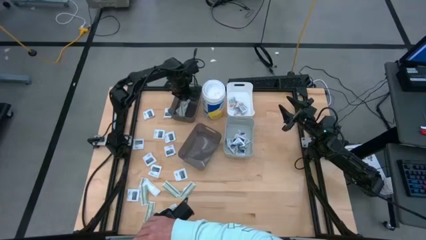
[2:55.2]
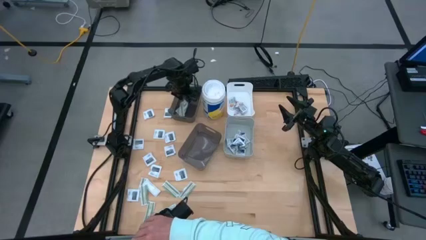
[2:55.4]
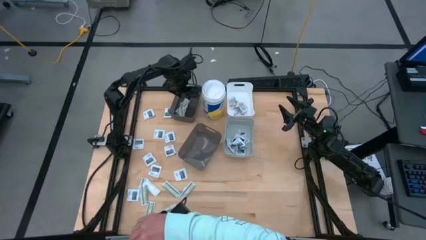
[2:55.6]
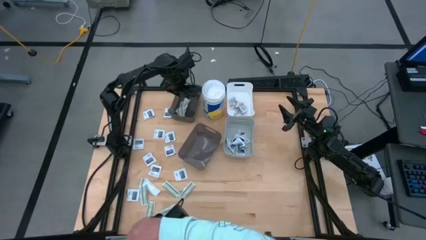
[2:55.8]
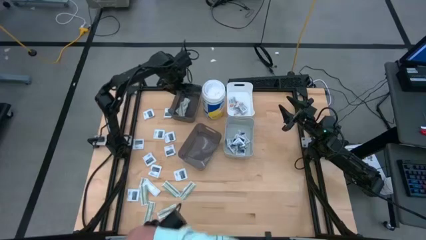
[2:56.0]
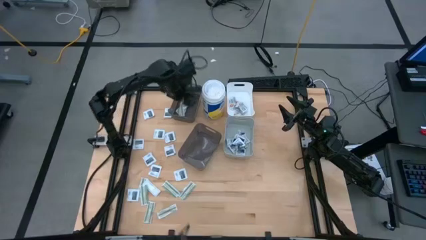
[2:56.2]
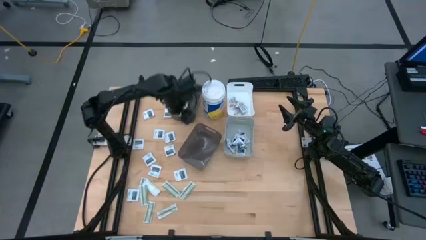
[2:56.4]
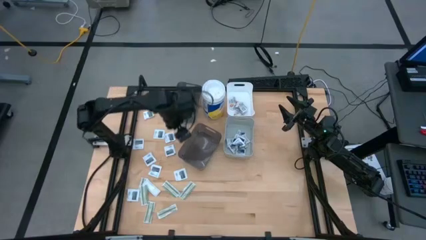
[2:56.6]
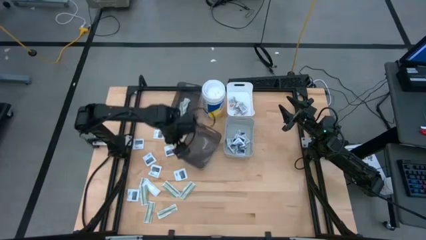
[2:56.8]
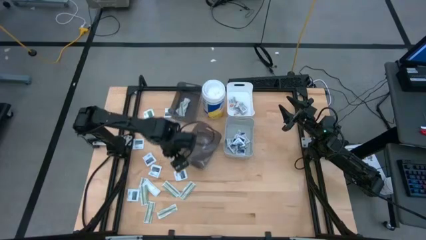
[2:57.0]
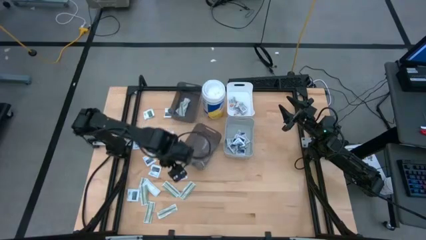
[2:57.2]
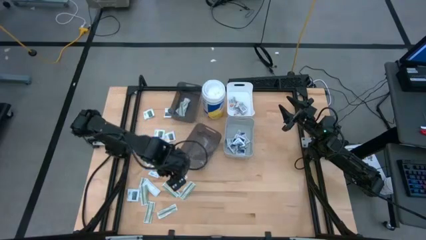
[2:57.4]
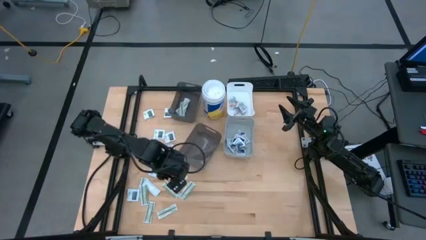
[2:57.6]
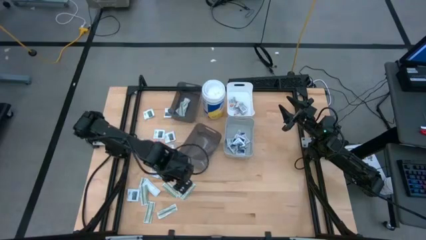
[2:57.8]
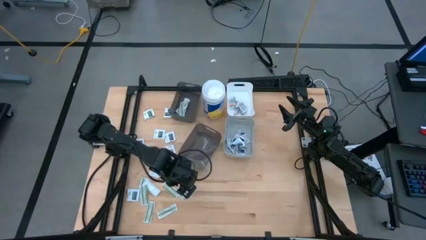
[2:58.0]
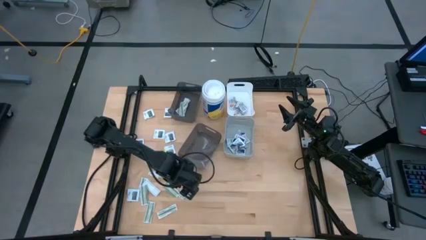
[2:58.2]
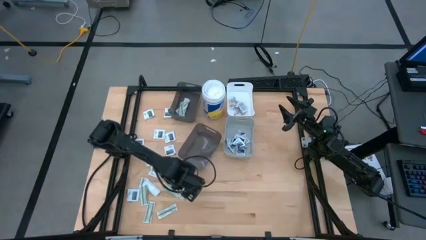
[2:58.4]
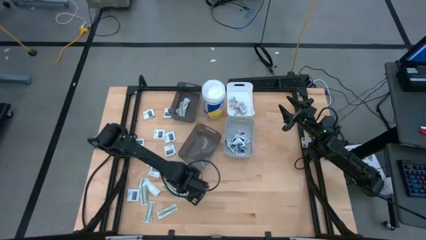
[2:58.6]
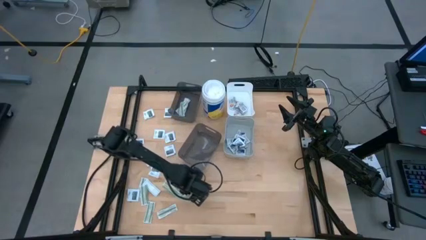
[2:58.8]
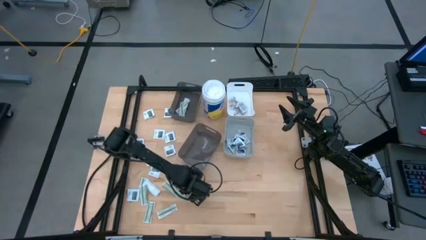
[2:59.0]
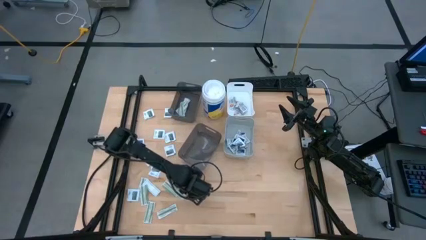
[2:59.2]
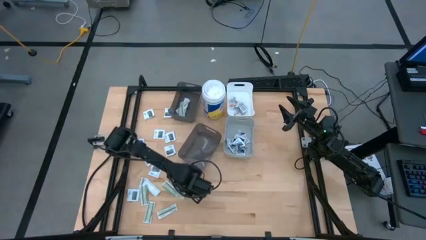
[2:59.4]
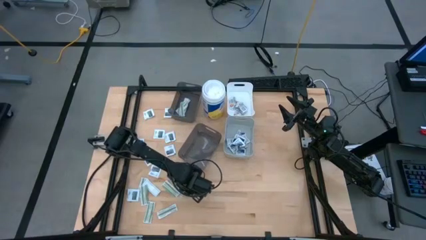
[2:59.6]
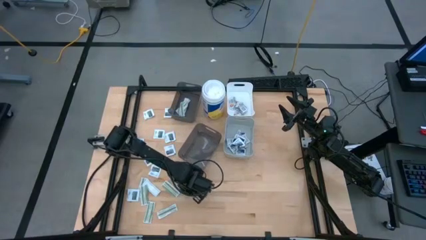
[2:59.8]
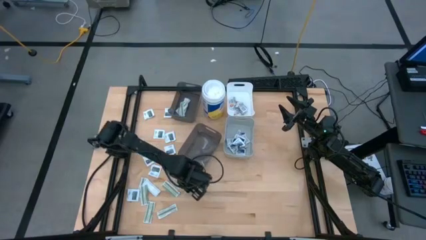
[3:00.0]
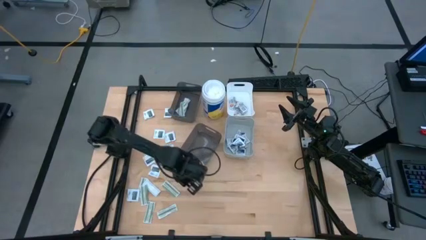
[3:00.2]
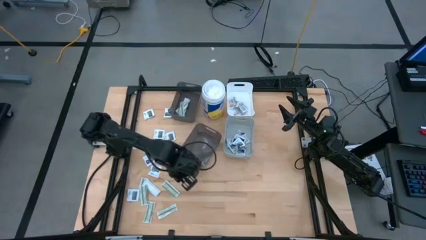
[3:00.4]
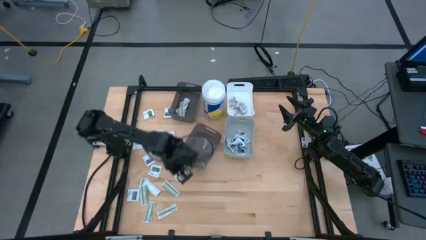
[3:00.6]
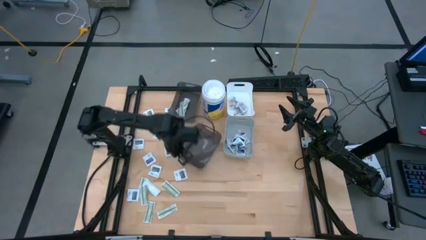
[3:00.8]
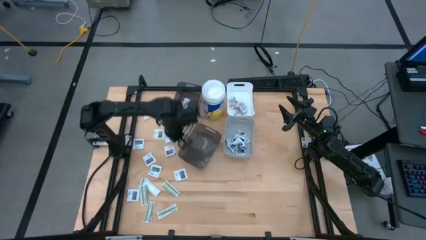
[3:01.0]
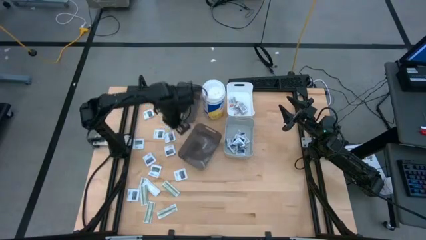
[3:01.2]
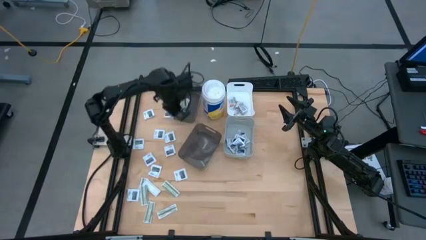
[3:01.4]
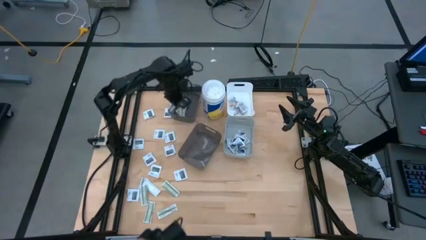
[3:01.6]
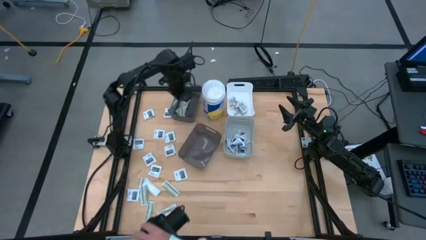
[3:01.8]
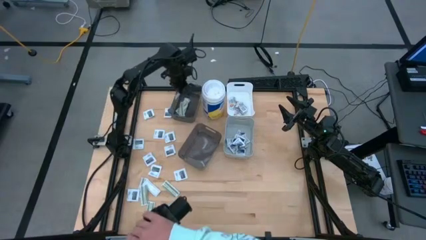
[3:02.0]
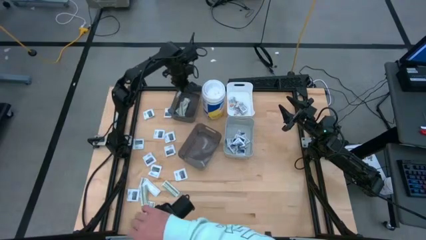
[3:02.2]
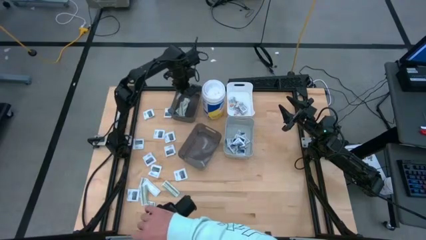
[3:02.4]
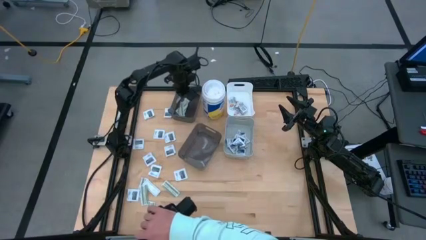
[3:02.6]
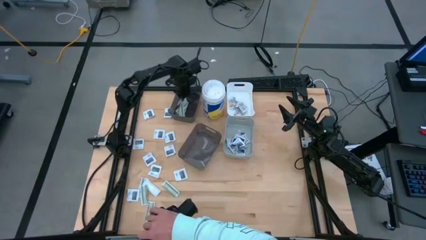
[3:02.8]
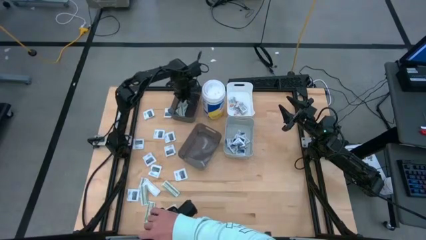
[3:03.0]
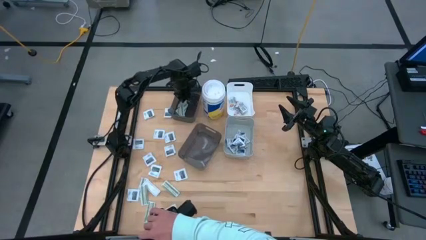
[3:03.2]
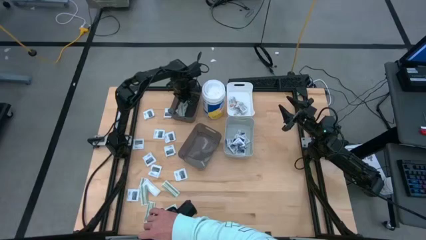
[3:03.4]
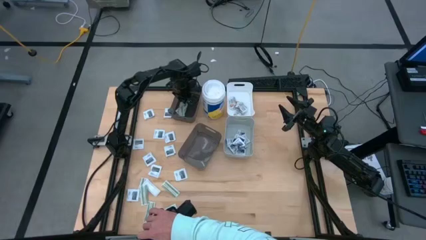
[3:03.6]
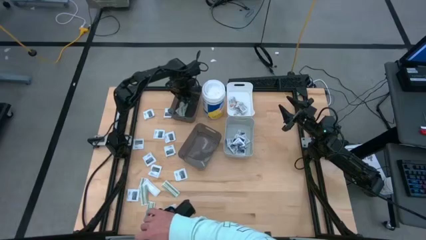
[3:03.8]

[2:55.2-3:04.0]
Task: Pick & Place First Aid Supplies
Put the bandage pack into the top black bin

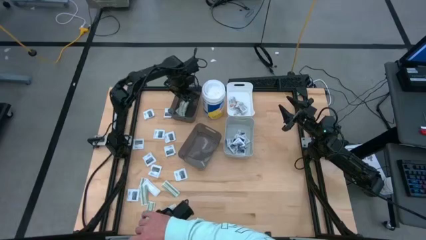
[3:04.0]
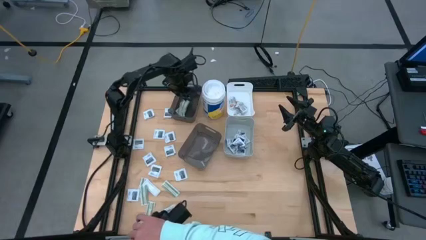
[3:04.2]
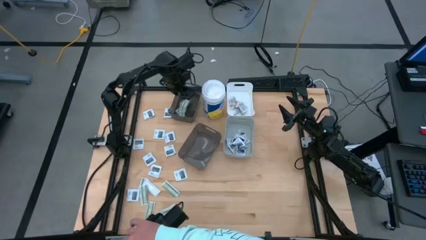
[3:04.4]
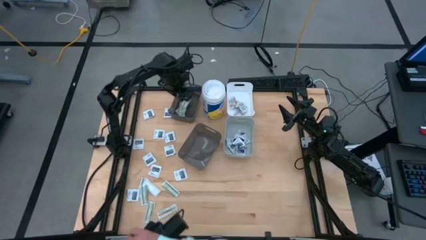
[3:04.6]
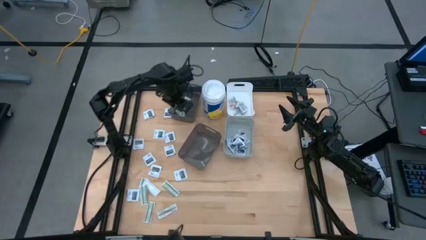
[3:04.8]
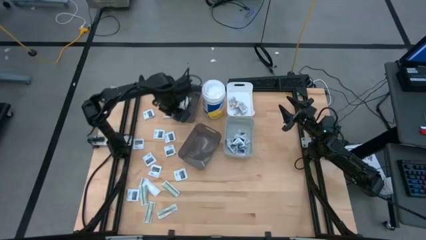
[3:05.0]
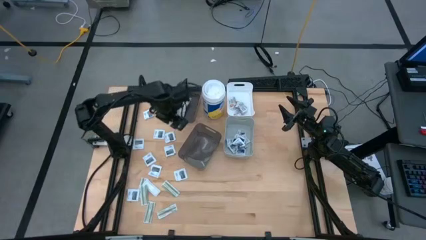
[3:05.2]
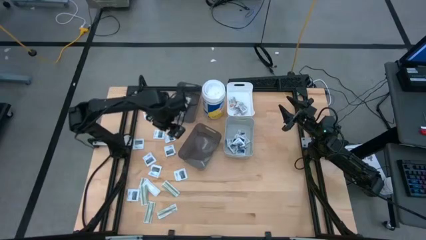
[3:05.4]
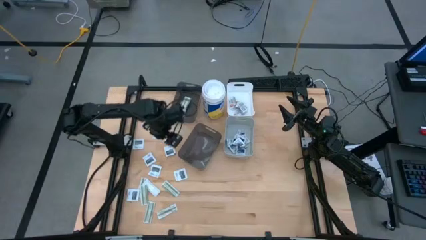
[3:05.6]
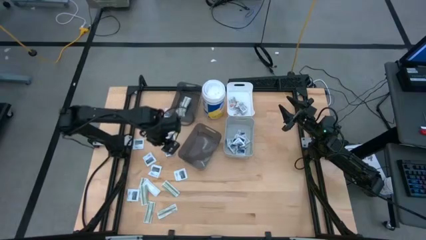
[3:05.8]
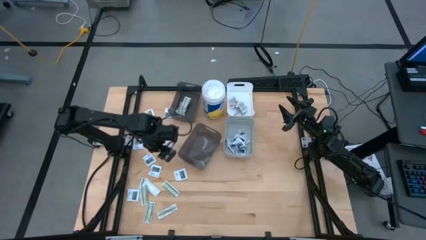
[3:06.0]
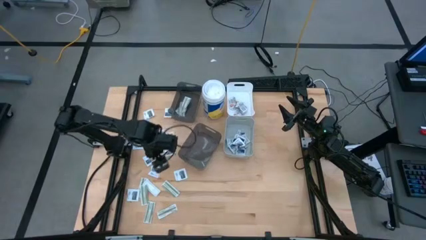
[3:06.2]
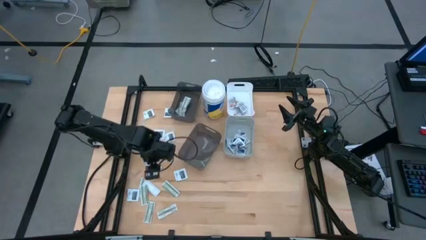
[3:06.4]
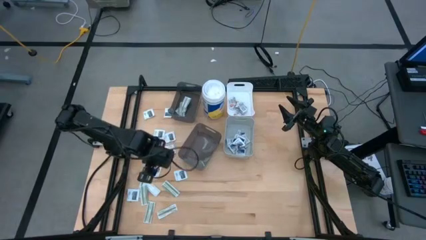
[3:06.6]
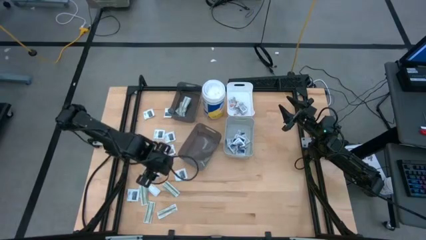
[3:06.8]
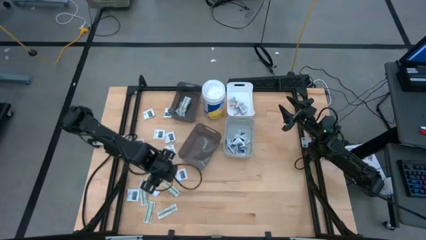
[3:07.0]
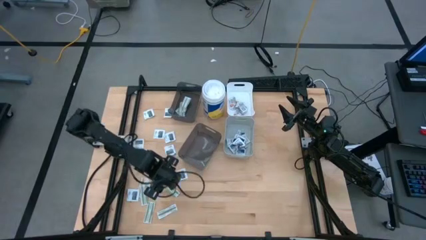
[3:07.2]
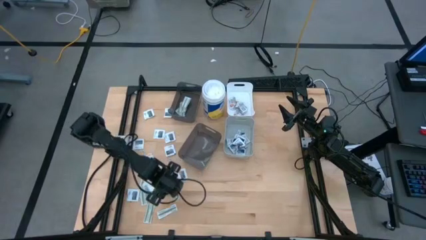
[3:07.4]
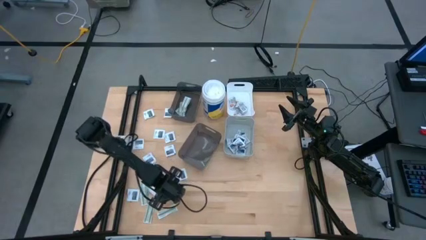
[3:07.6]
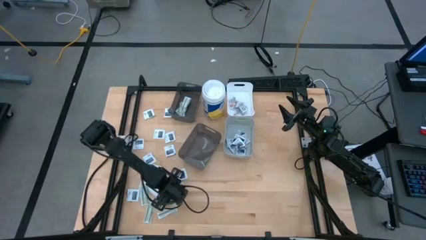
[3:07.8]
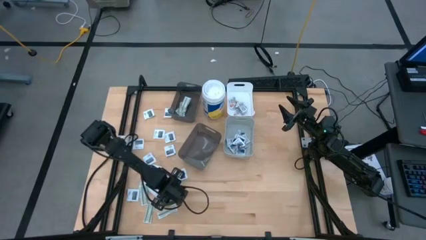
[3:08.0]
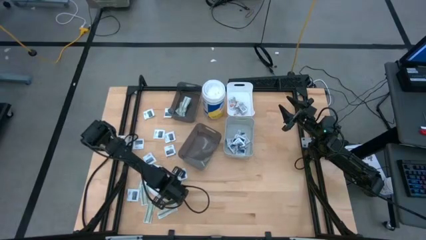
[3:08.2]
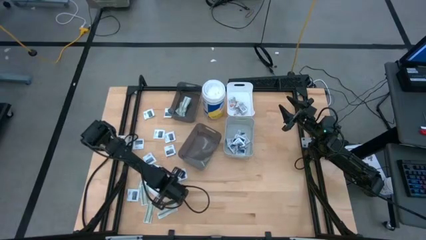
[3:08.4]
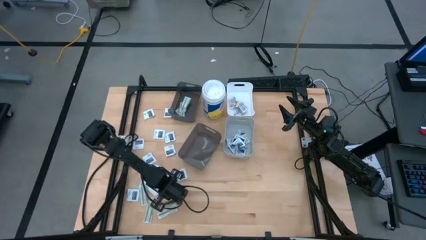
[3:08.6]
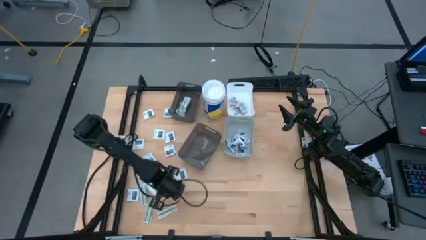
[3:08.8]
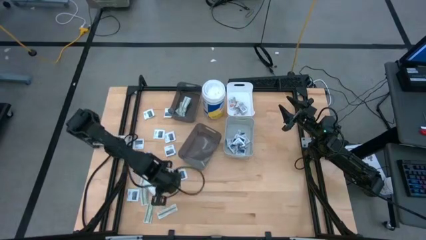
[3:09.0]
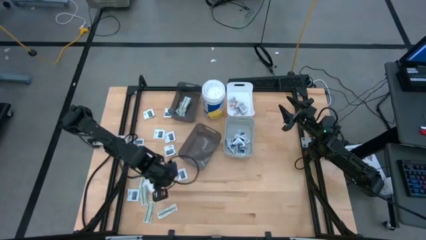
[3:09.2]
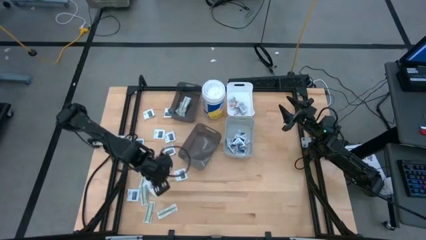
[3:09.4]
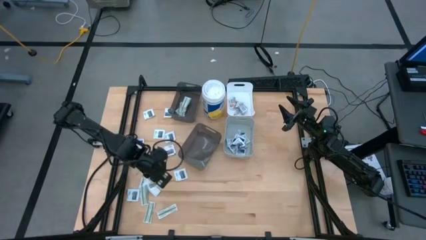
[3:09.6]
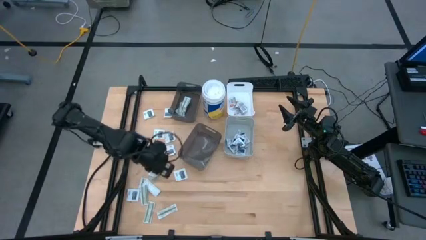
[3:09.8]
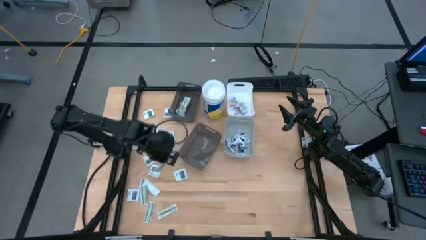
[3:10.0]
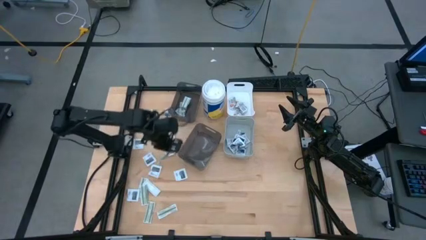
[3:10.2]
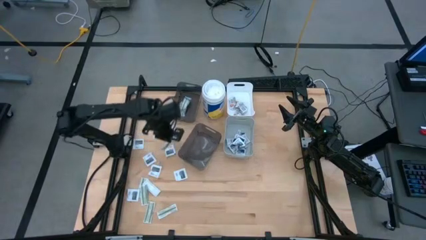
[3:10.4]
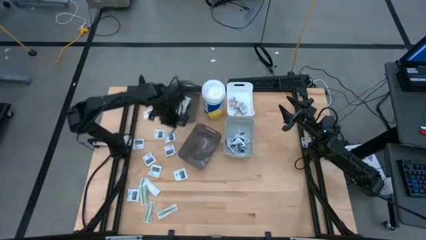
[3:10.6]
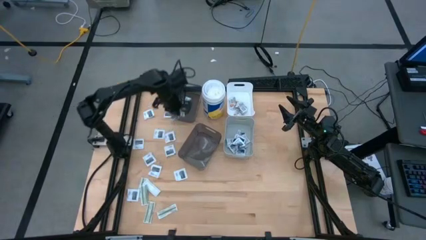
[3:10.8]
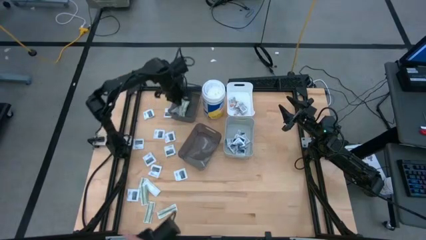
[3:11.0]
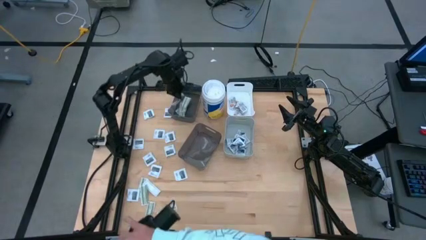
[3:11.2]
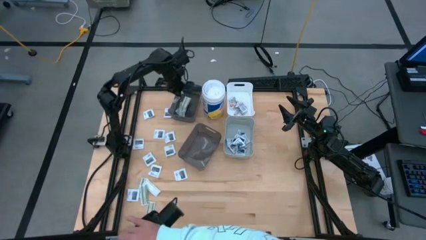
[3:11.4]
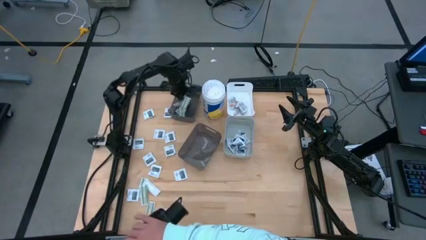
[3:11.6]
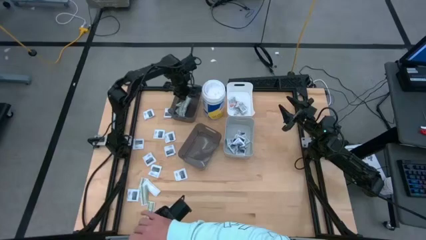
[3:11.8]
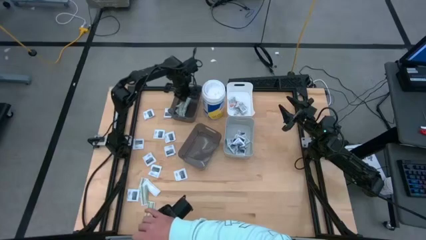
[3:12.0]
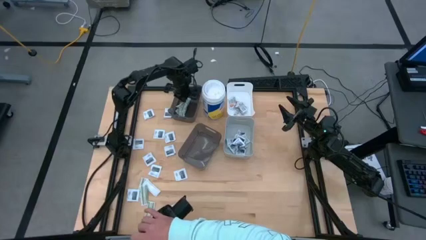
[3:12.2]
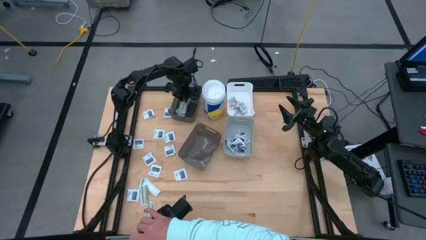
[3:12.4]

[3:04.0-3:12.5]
Put the bandage pack into the top black bin
